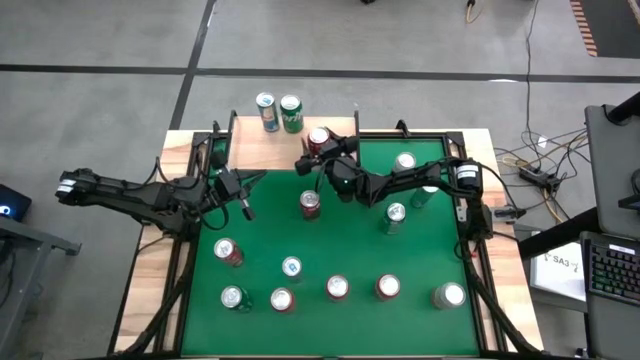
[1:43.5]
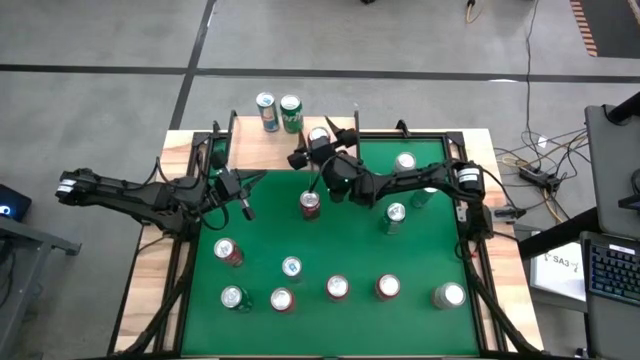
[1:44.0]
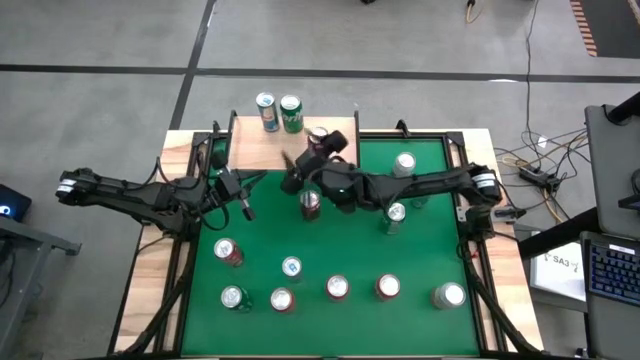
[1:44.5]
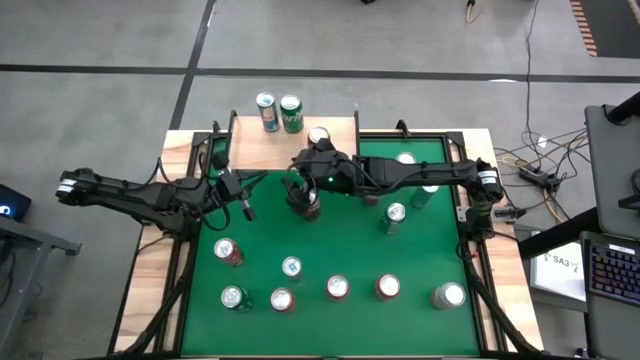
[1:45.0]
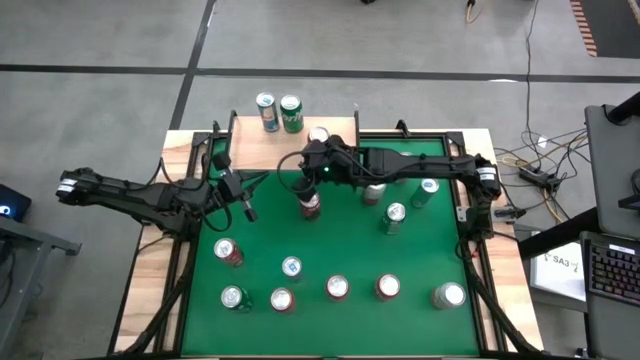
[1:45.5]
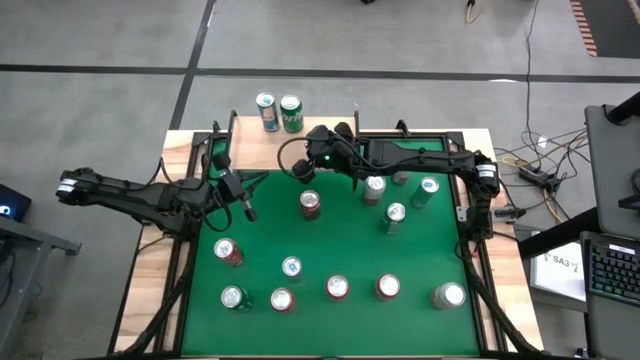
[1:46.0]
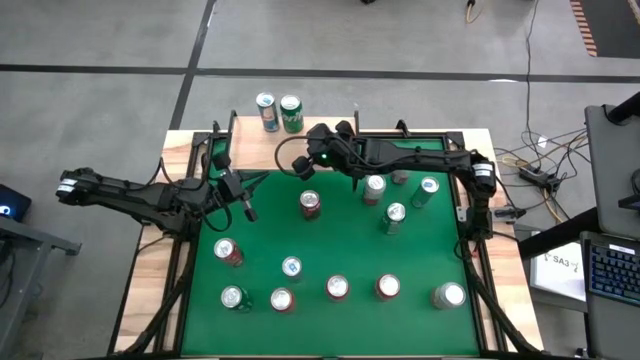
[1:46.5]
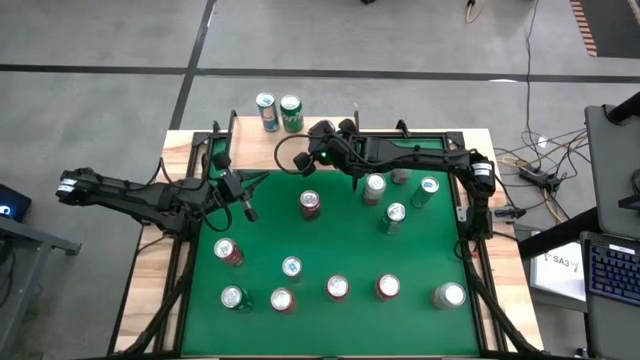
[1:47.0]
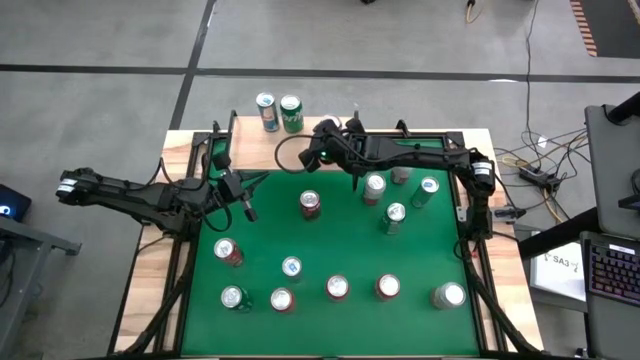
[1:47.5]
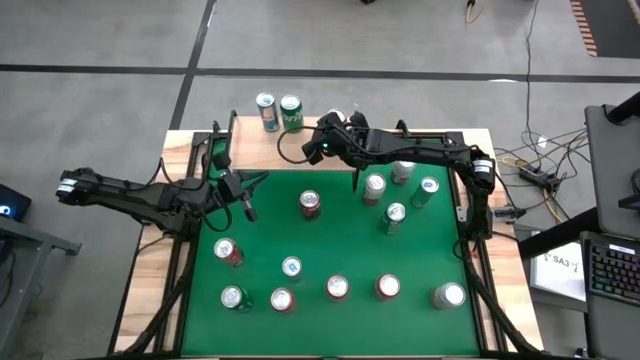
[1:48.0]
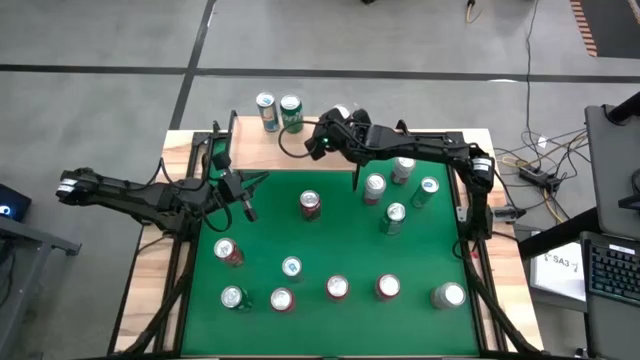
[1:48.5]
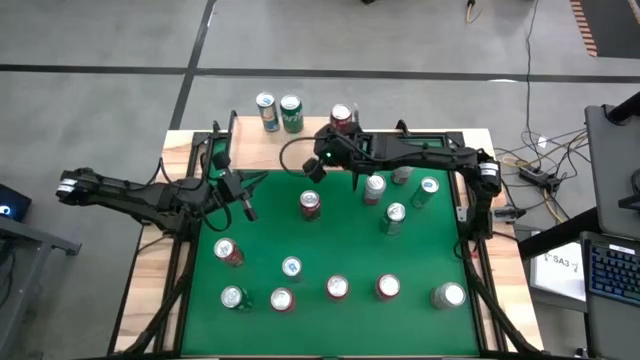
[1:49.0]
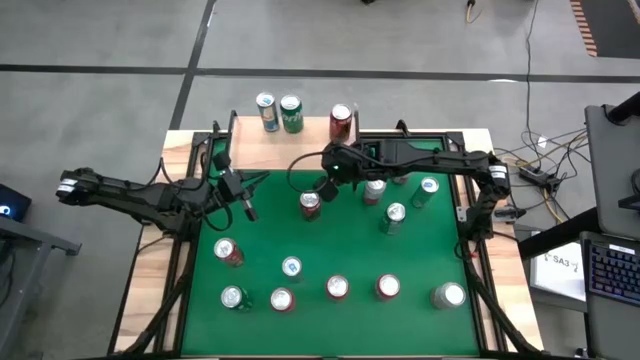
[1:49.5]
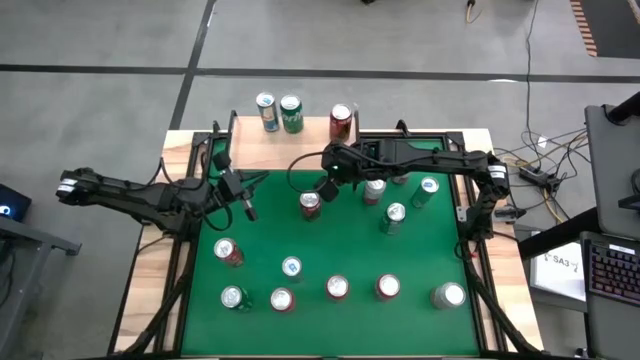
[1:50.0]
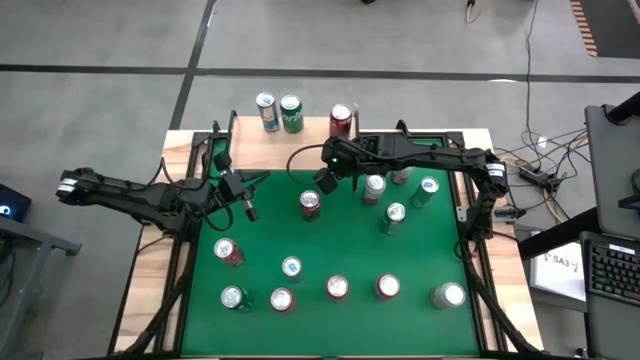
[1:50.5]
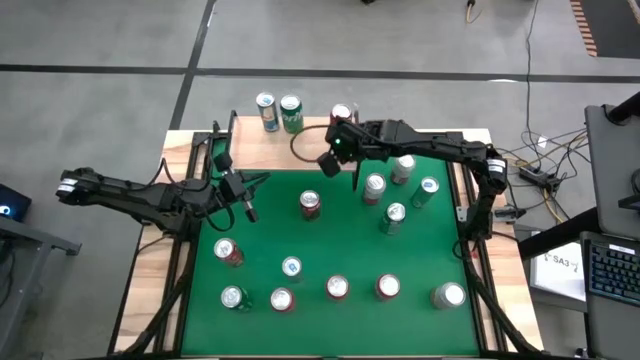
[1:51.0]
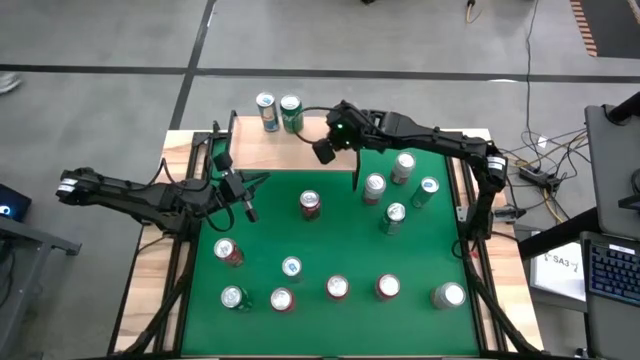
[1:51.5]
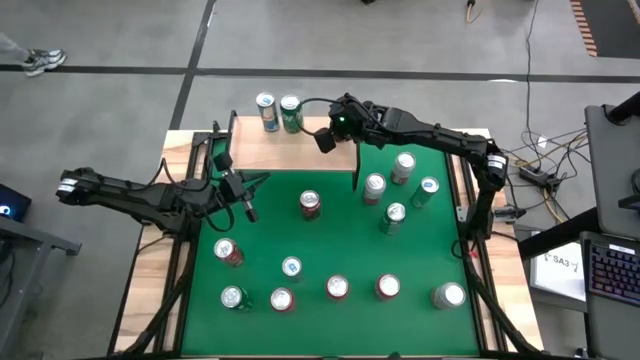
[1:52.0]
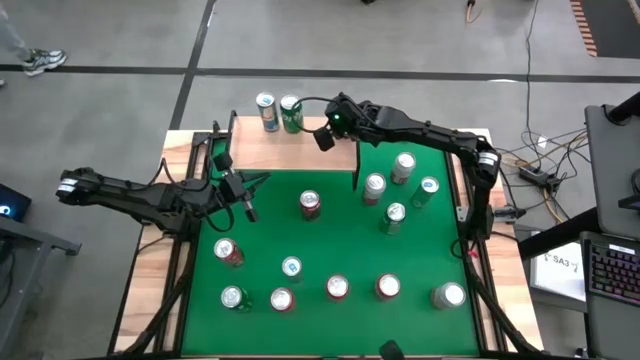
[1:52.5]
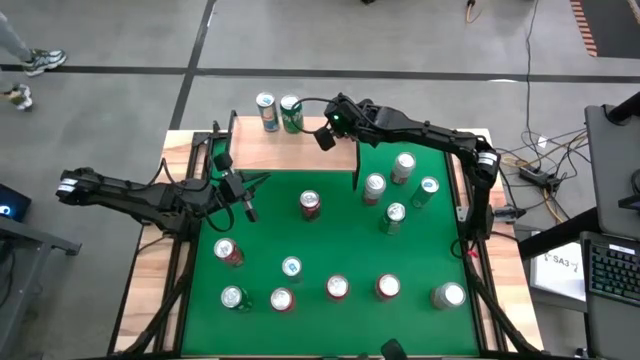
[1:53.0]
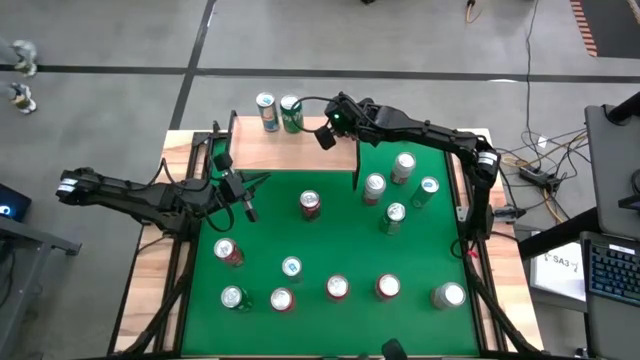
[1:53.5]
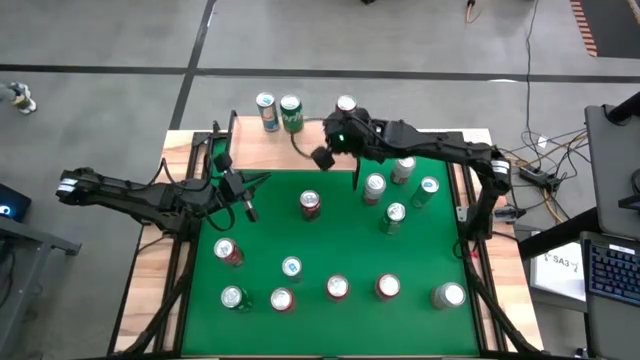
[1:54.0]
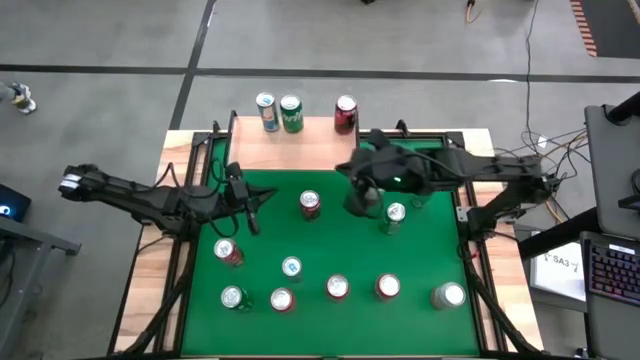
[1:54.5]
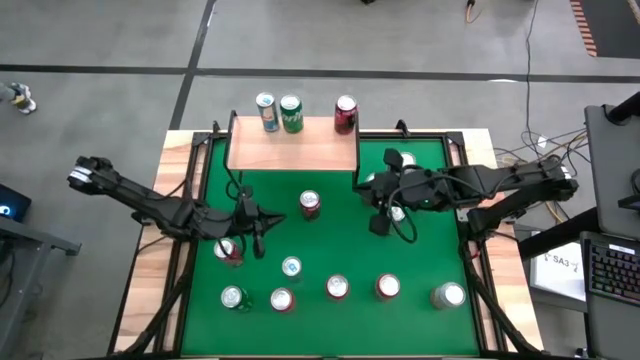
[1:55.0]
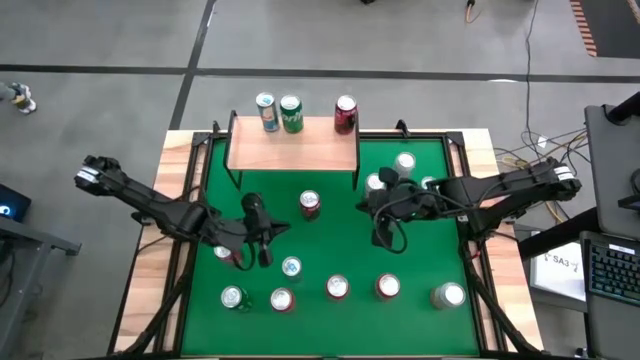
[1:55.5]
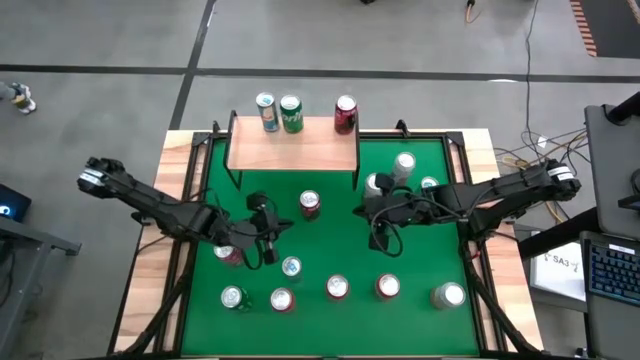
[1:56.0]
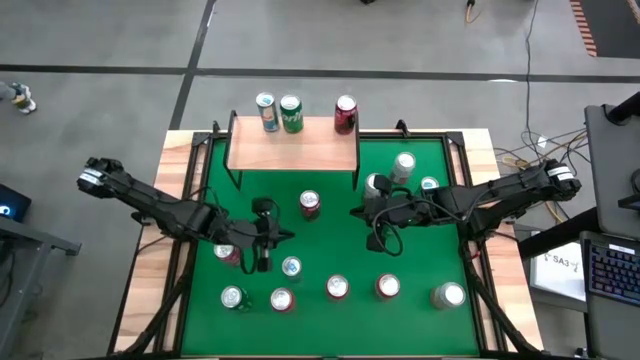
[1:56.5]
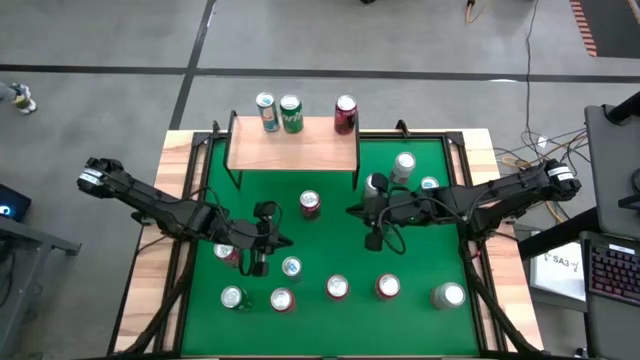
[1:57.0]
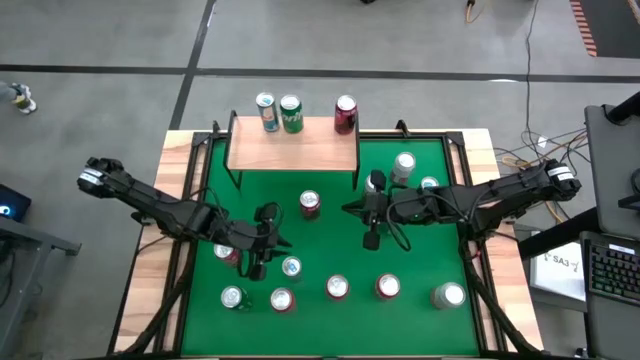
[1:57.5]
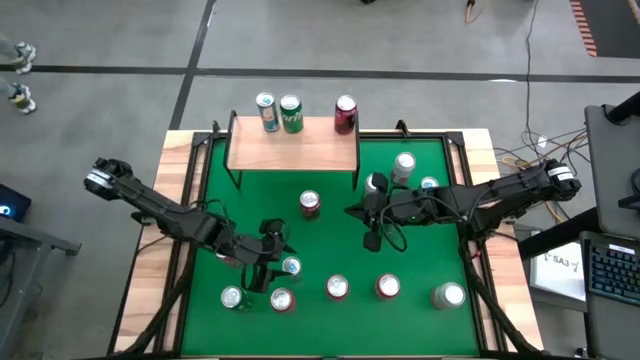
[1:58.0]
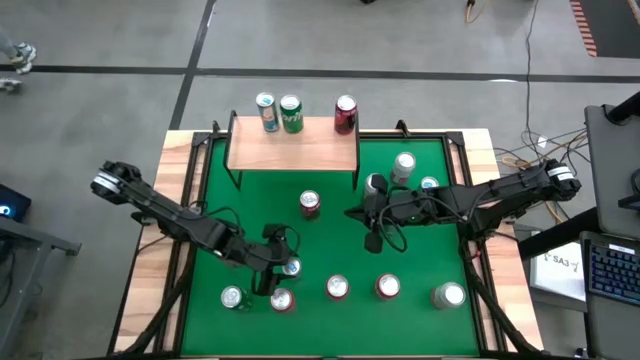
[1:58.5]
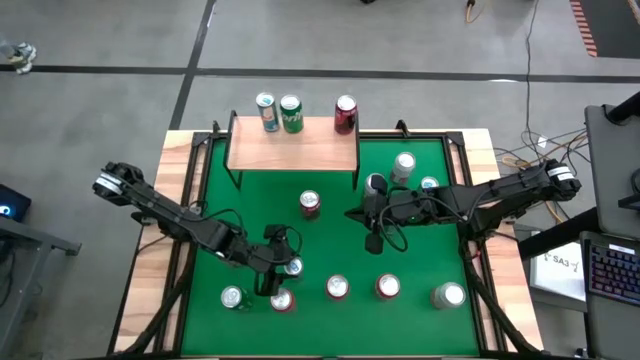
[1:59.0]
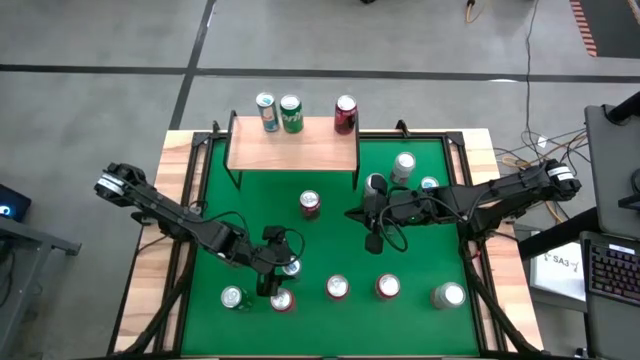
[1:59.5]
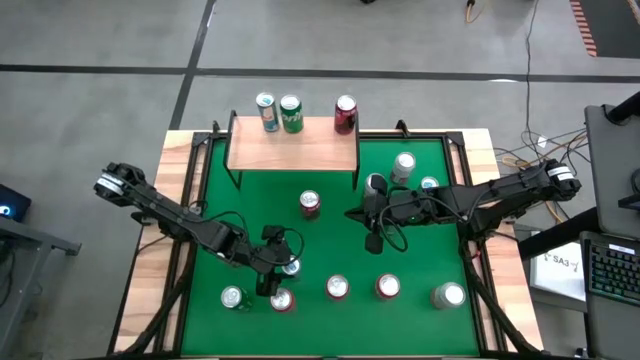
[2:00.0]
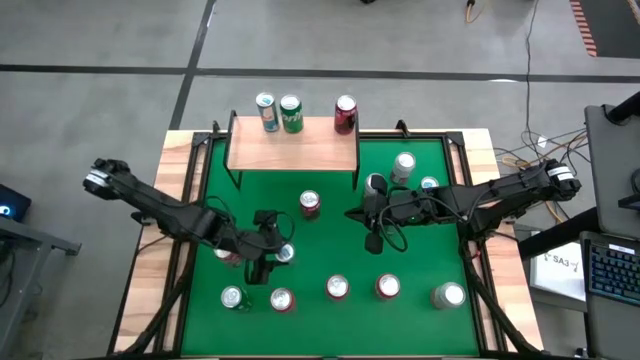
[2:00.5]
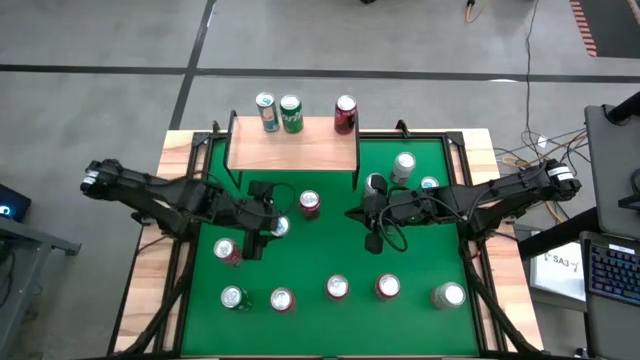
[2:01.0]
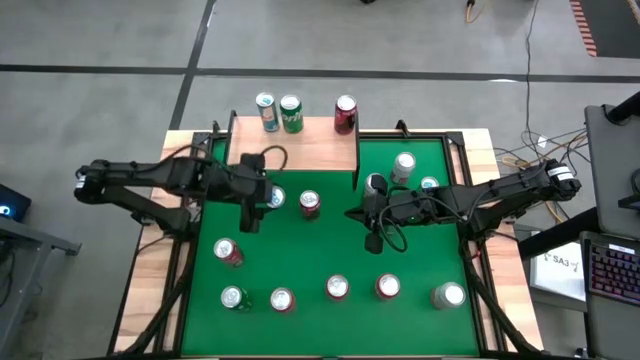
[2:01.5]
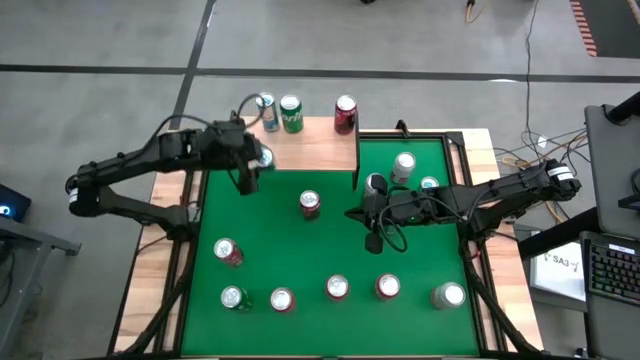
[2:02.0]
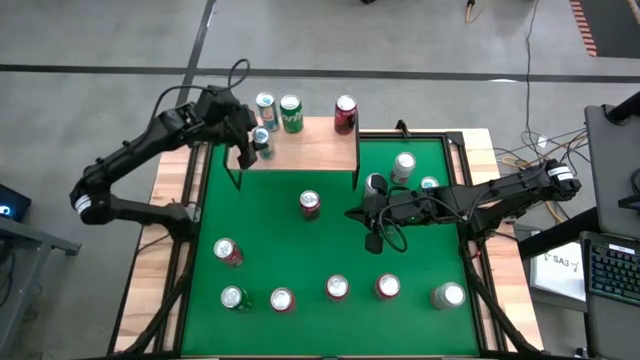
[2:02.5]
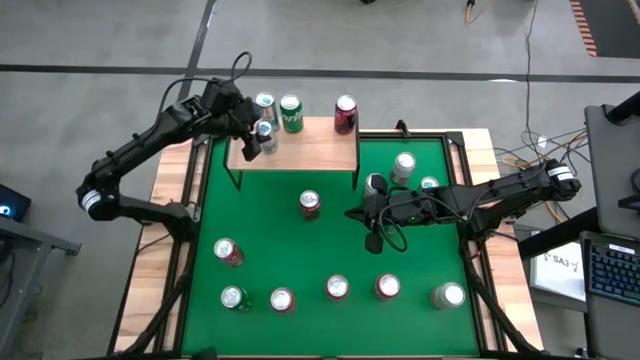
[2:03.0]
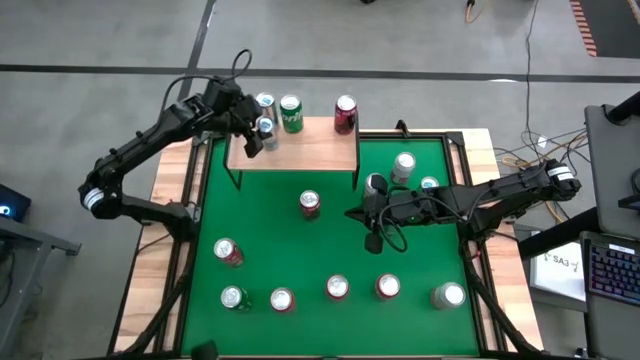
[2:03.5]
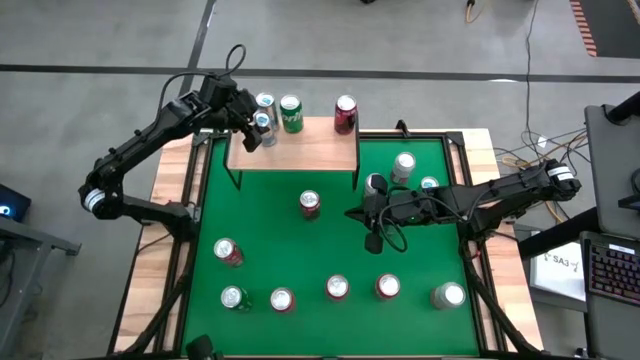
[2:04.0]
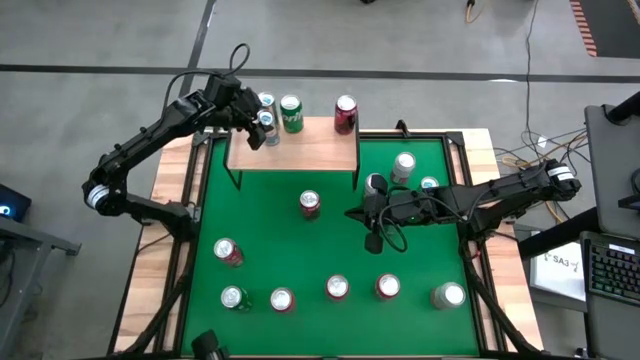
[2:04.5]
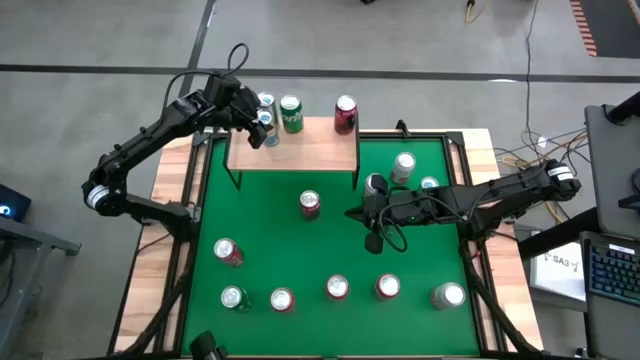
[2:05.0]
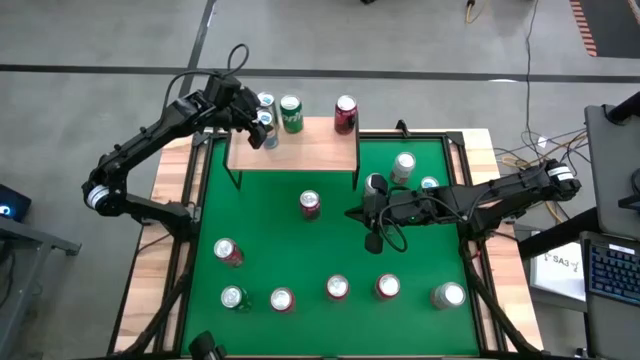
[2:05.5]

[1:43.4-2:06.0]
Task: Place canned beverage on shelf
Put the blue can on the shelf
